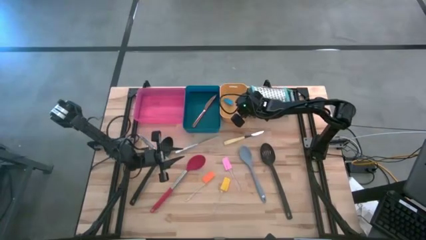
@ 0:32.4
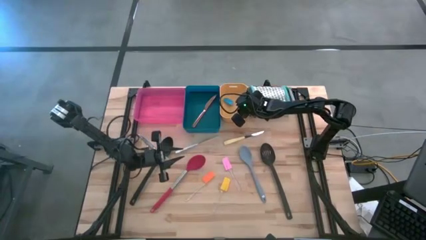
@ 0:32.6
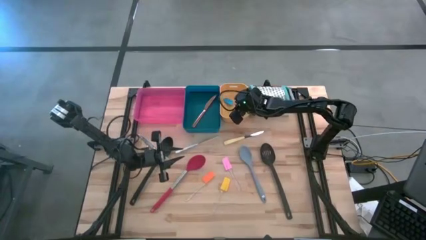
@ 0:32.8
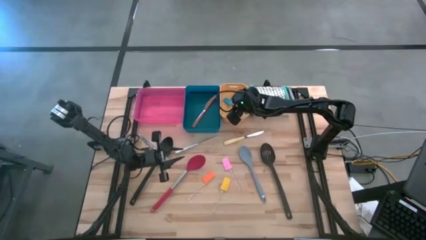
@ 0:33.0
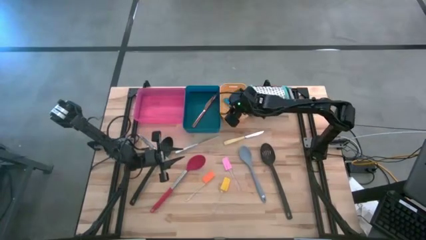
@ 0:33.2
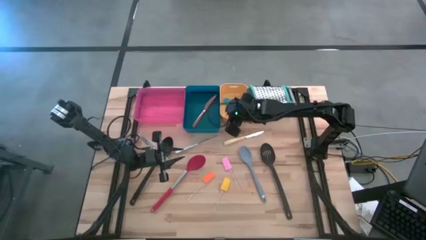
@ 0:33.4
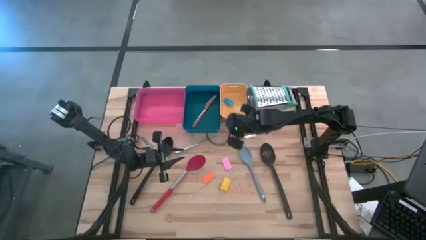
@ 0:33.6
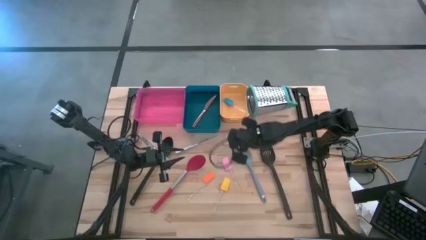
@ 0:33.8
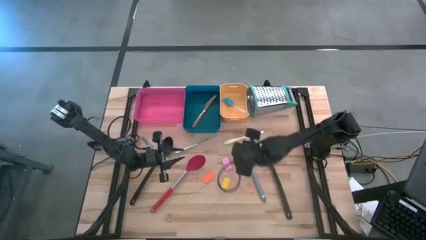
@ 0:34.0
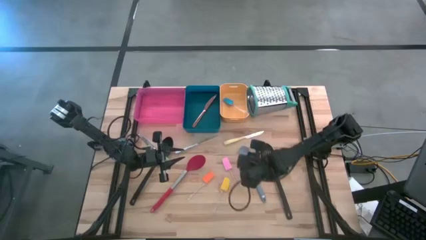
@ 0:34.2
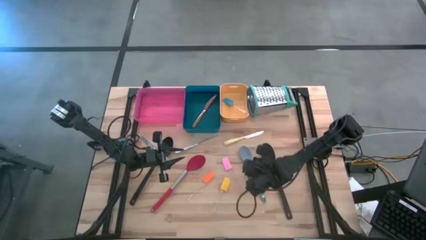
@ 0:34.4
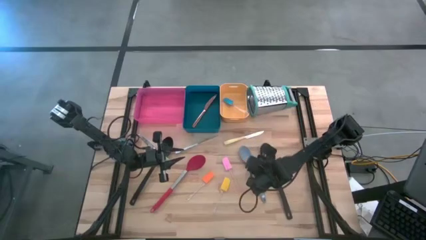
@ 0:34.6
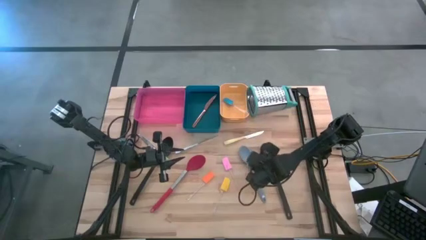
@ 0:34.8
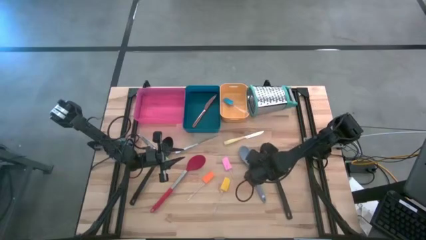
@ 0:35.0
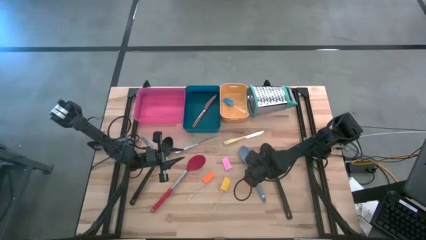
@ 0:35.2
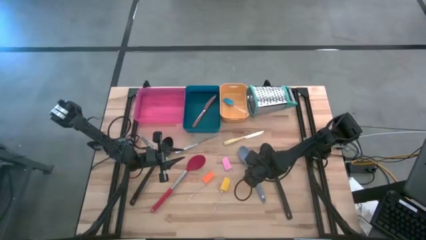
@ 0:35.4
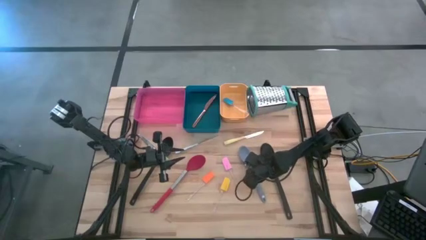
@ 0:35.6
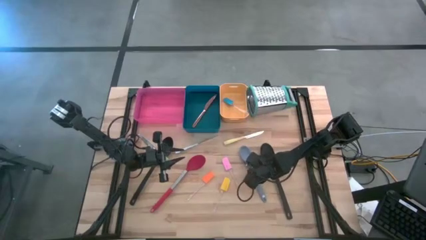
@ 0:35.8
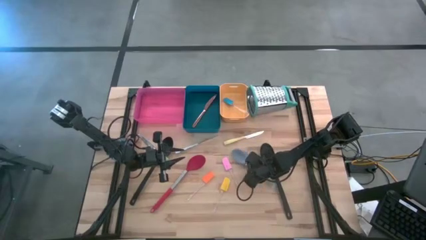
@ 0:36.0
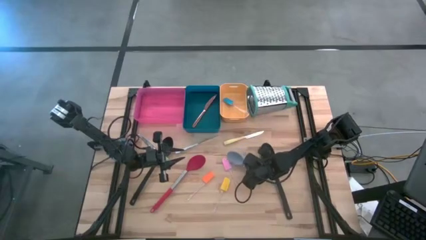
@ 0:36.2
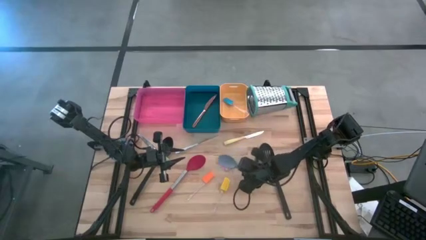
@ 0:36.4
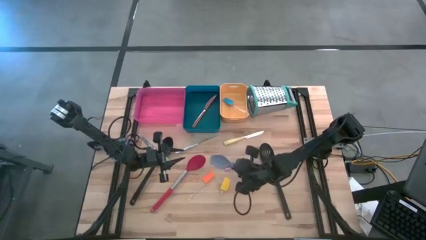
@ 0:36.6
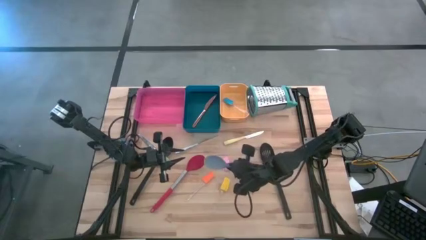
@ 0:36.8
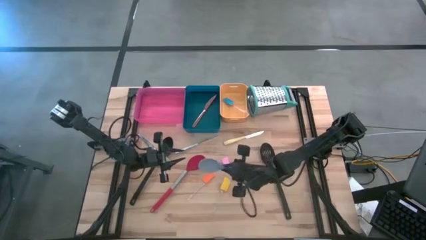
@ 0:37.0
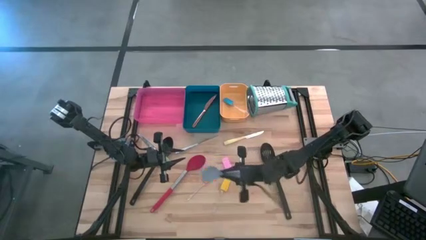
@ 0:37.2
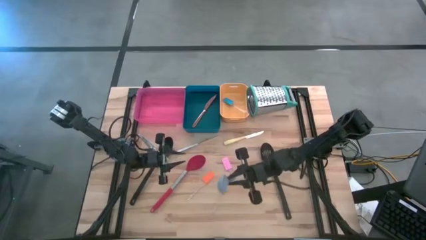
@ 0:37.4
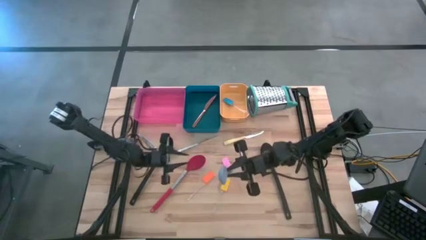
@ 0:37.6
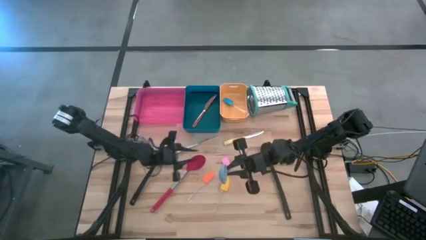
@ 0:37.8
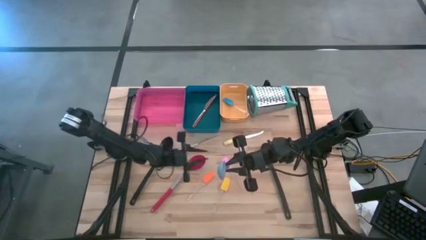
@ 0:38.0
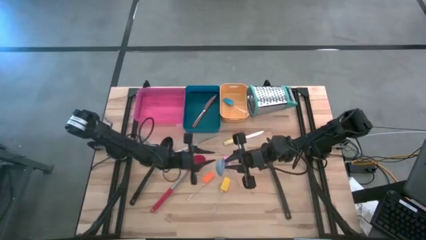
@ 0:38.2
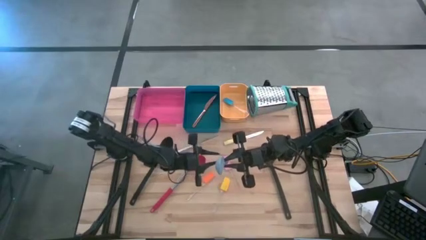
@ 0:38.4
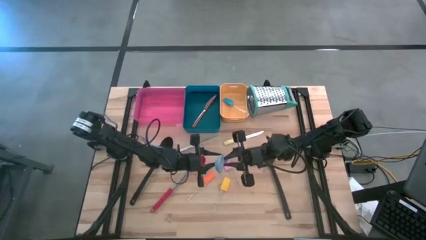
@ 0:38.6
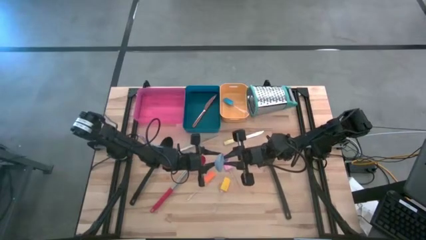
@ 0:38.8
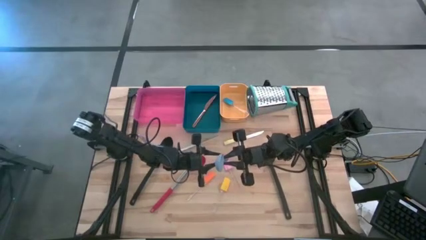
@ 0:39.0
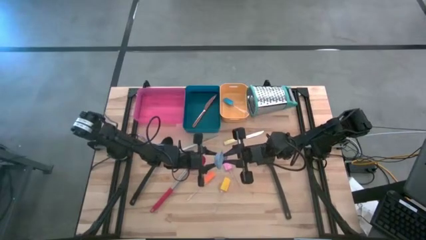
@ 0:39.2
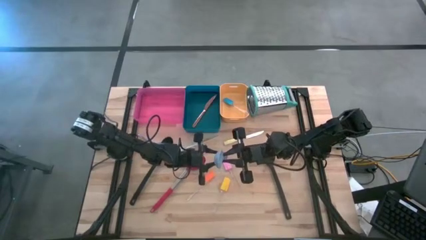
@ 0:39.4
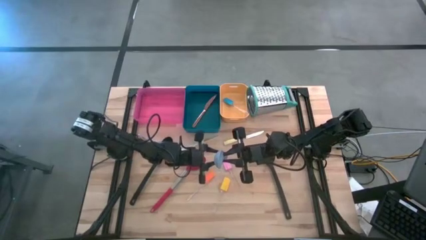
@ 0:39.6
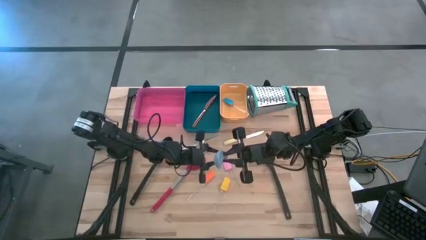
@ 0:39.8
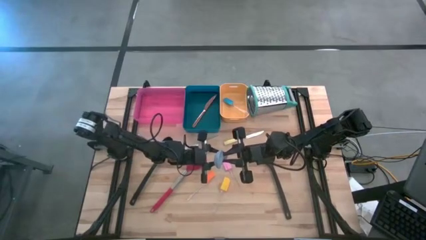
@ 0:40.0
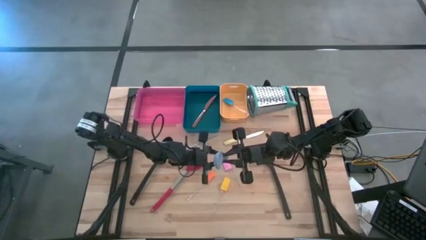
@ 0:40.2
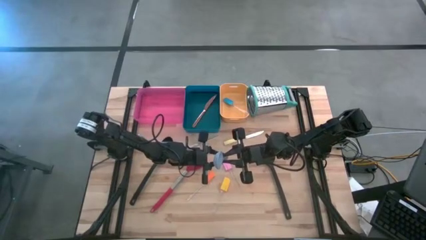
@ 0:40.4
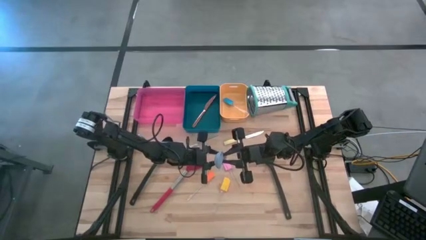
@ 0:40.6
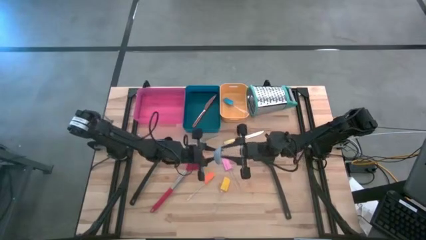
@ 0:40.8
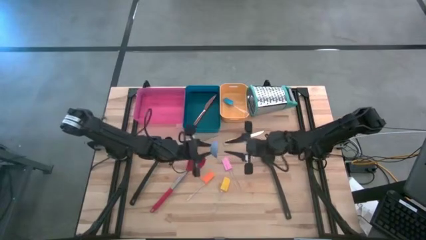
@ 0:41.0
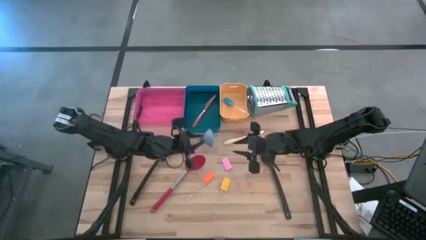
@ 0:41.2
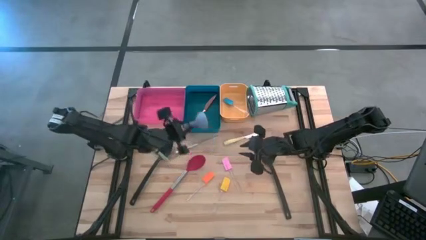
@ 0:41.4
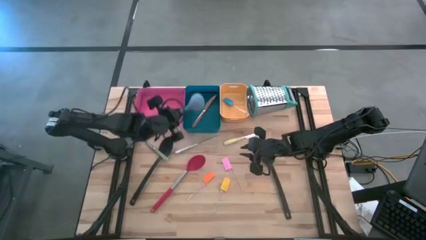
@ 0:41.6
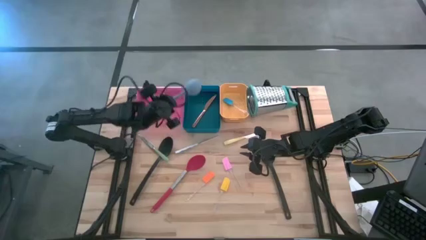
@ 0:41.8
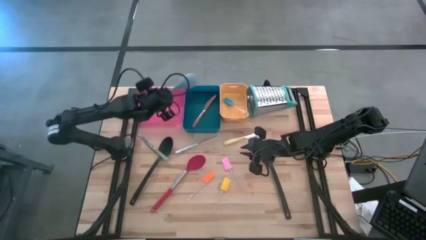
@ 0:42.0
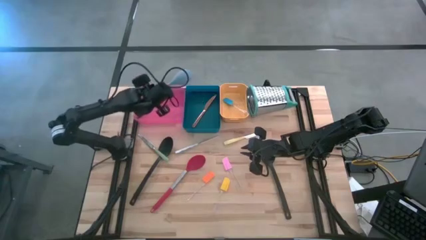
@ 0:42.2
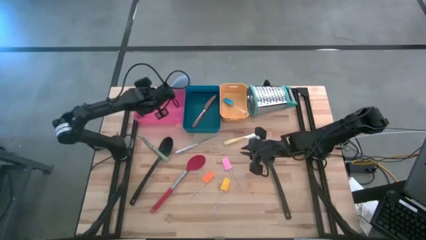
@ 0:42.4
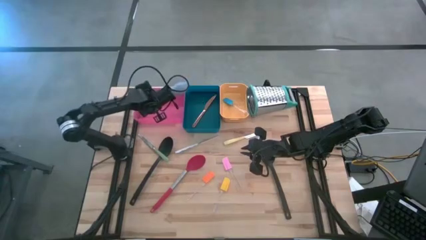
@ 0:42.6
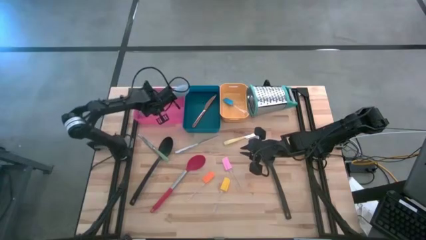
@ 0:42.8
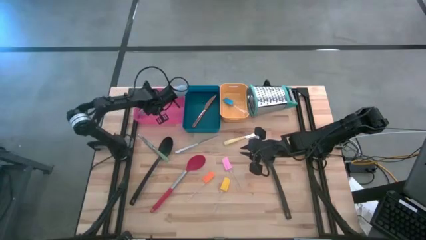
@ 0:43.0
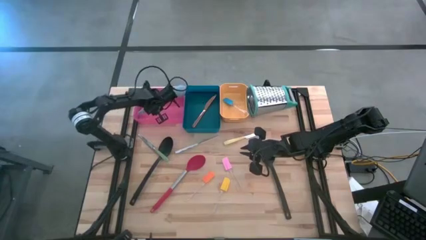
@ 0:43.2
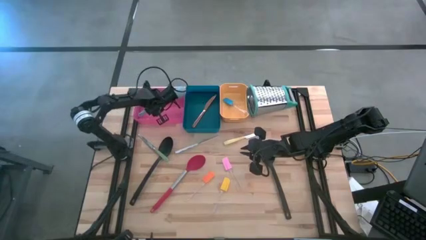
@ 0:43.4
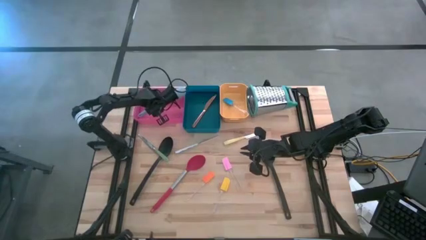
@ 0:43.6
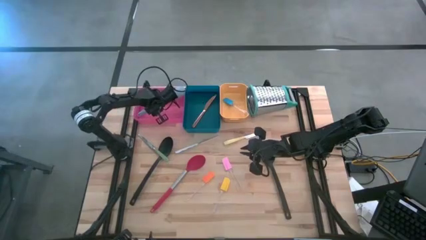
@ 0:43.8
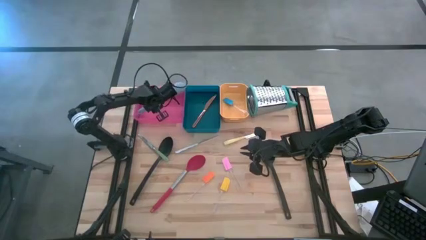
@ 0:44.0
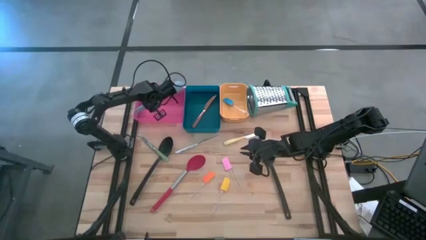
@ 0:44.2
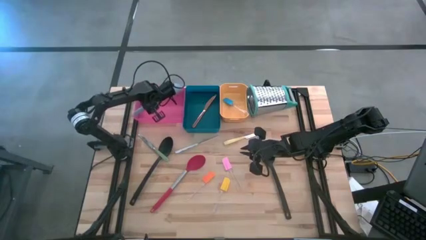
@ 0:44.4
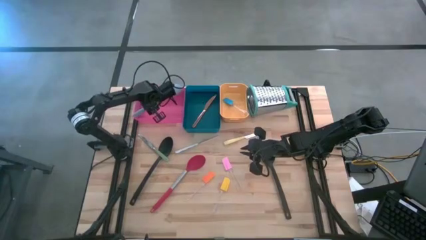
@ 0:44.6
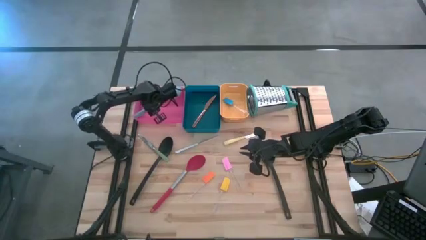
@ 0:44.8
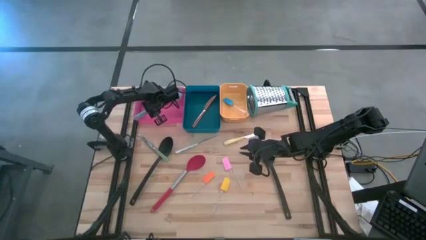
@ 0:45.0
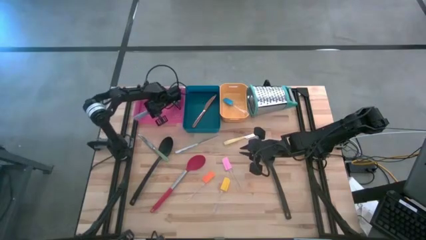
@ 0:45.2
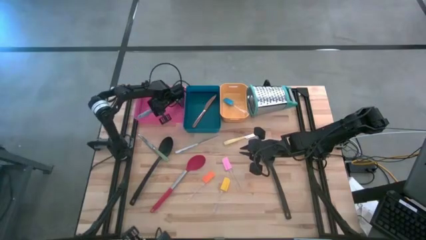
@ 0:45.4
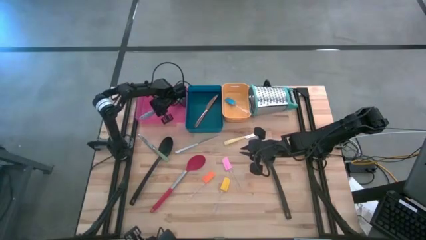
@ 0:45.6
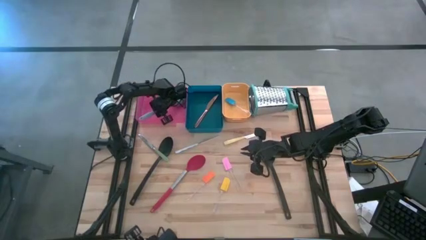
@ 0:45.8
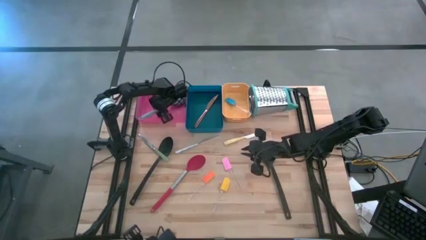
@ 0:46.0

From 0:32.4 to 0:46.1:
Task: Pick & Place Kitchen Items
Put the gray serving spoon into the pink bin
